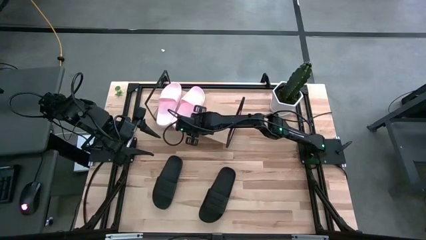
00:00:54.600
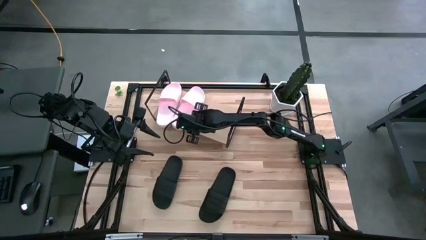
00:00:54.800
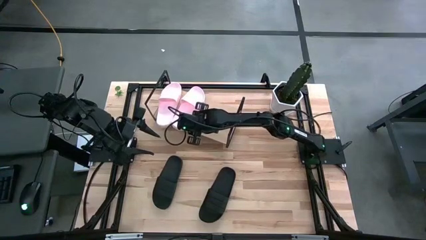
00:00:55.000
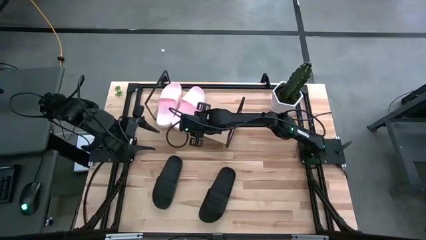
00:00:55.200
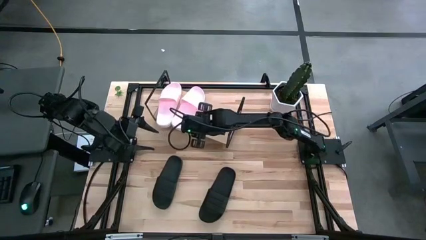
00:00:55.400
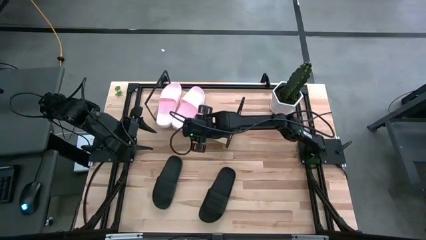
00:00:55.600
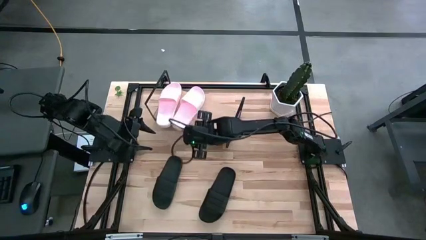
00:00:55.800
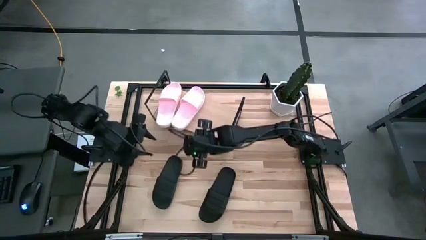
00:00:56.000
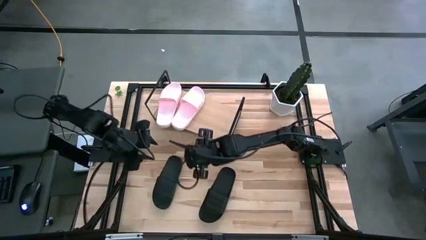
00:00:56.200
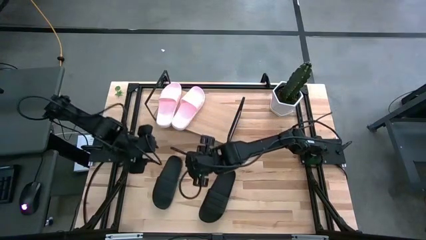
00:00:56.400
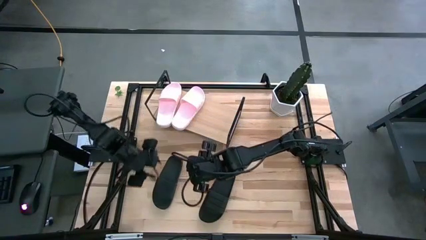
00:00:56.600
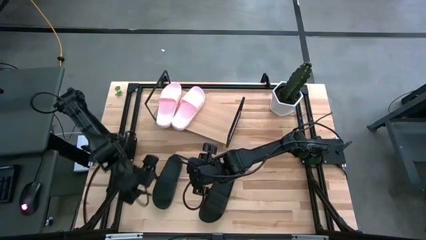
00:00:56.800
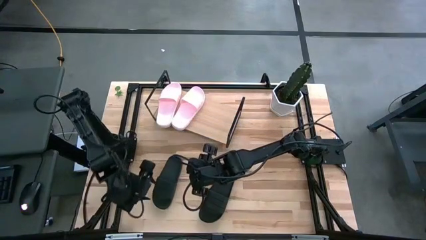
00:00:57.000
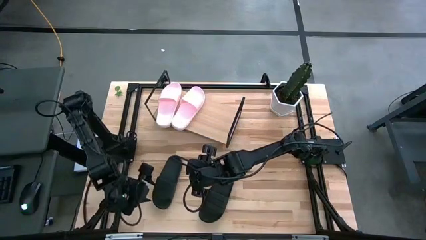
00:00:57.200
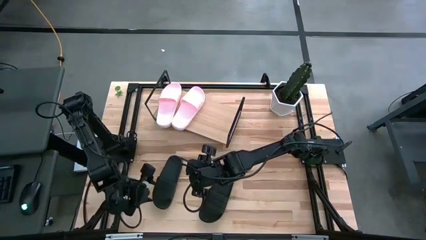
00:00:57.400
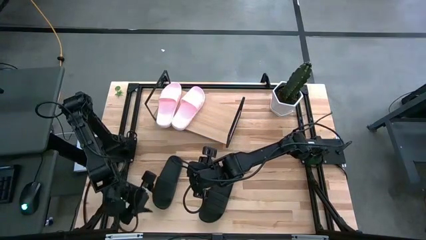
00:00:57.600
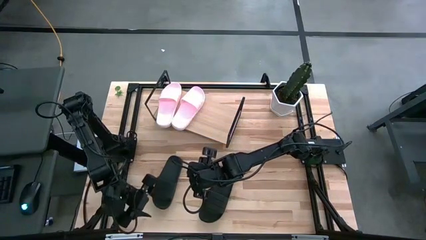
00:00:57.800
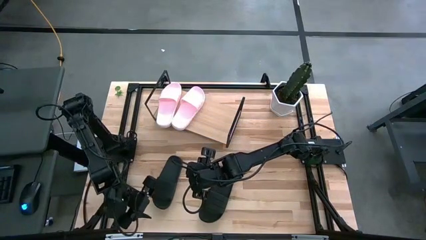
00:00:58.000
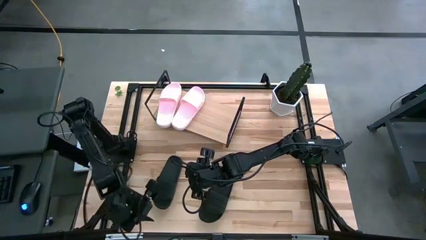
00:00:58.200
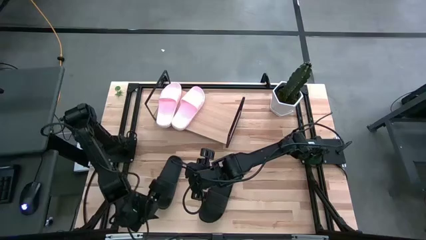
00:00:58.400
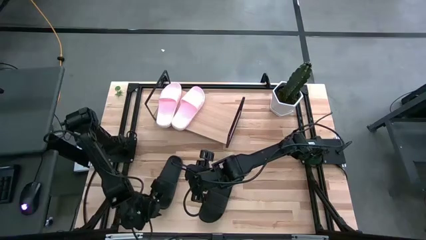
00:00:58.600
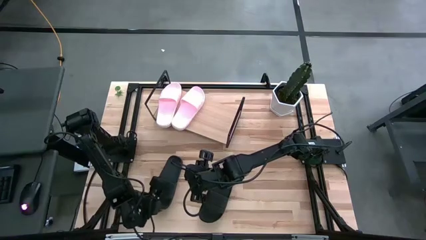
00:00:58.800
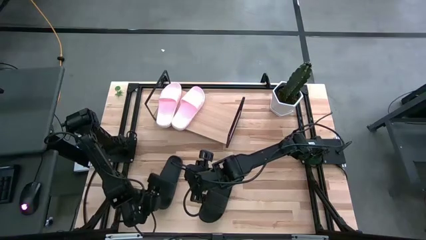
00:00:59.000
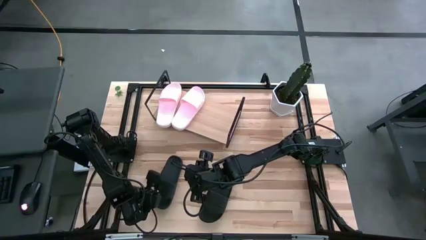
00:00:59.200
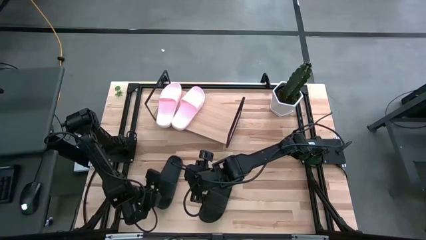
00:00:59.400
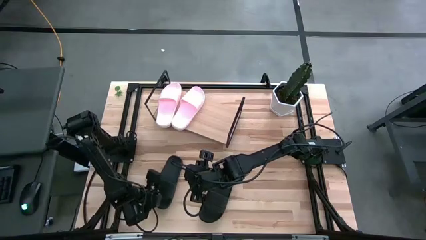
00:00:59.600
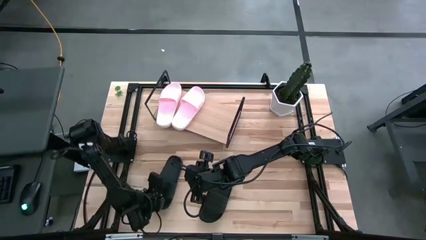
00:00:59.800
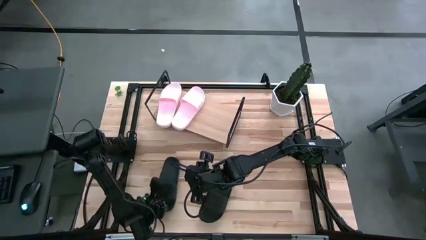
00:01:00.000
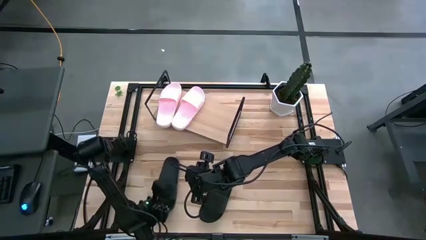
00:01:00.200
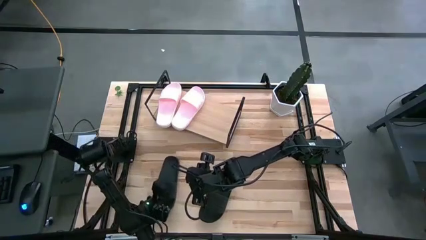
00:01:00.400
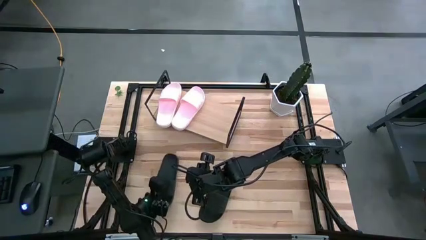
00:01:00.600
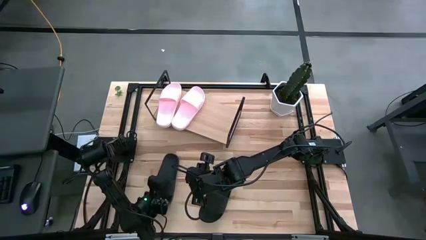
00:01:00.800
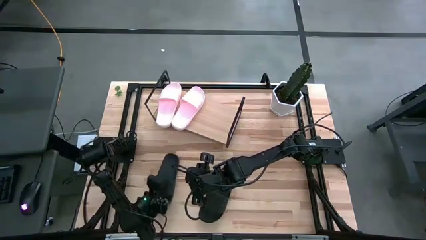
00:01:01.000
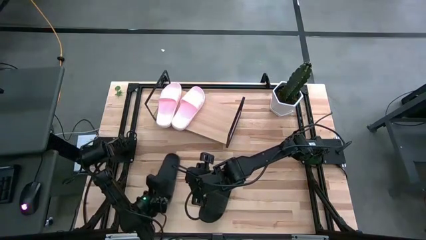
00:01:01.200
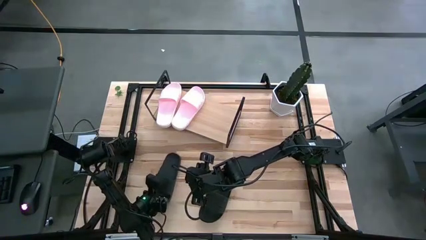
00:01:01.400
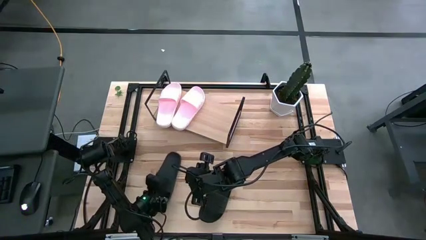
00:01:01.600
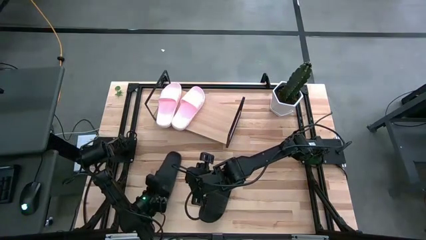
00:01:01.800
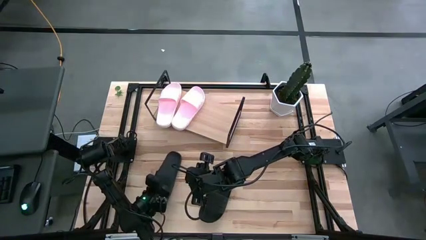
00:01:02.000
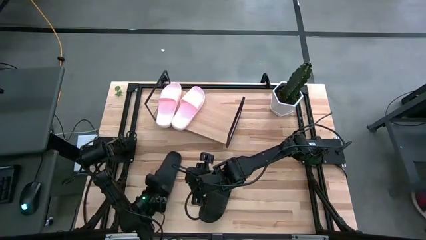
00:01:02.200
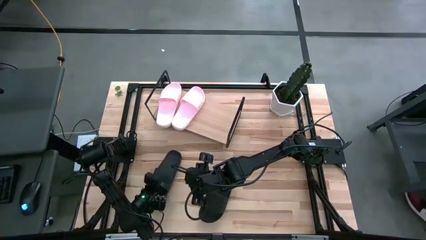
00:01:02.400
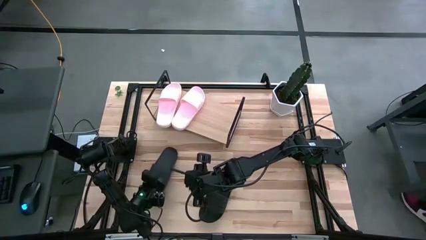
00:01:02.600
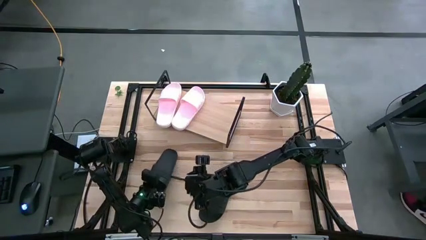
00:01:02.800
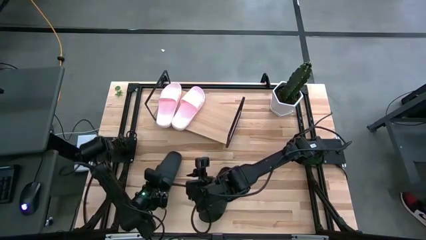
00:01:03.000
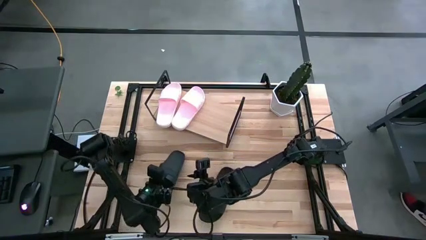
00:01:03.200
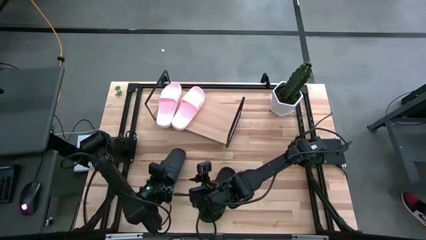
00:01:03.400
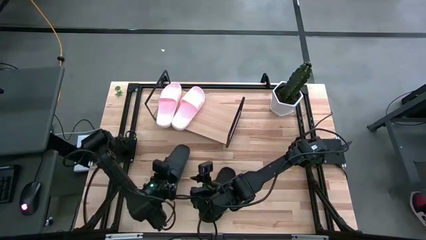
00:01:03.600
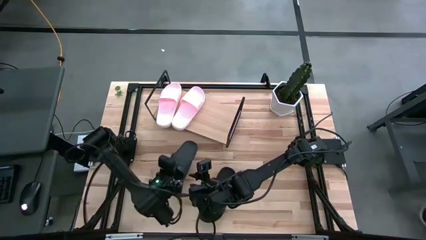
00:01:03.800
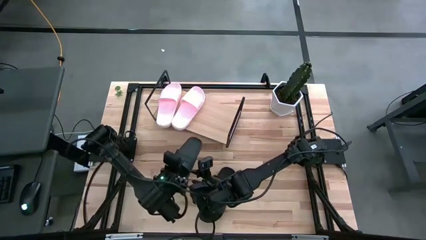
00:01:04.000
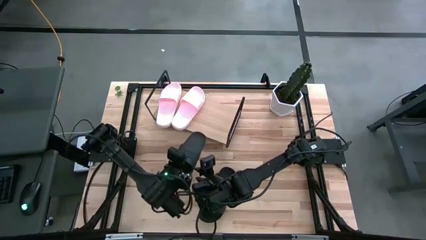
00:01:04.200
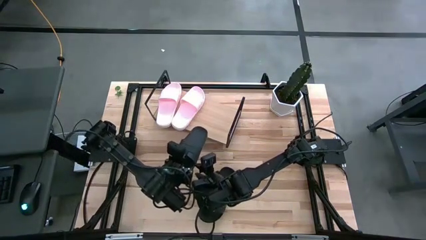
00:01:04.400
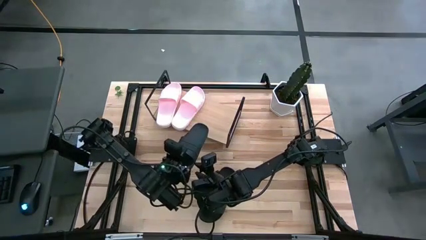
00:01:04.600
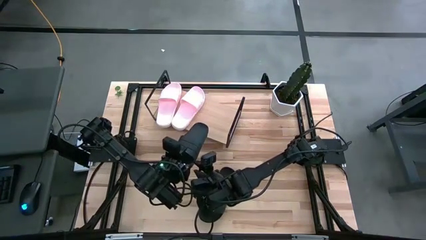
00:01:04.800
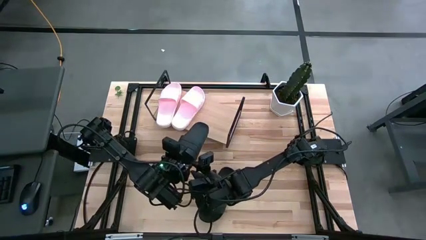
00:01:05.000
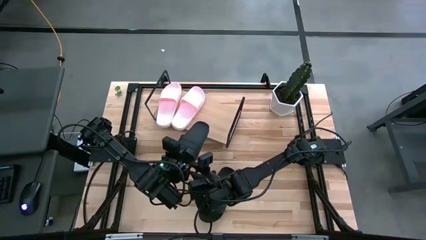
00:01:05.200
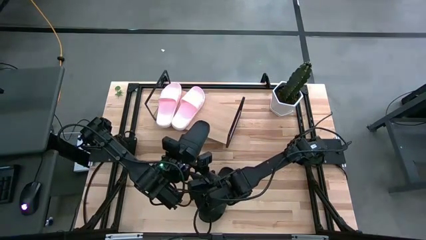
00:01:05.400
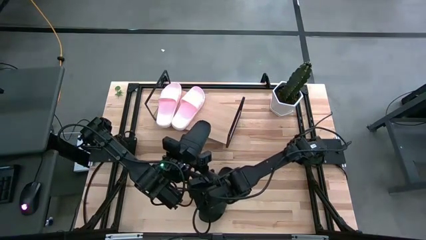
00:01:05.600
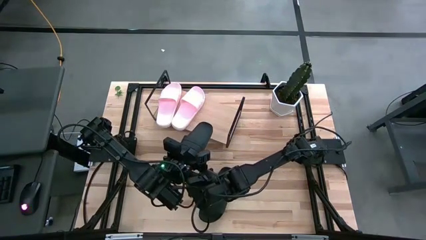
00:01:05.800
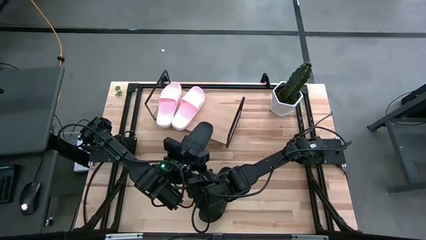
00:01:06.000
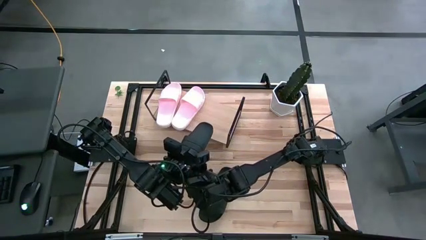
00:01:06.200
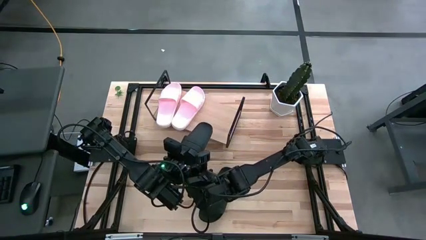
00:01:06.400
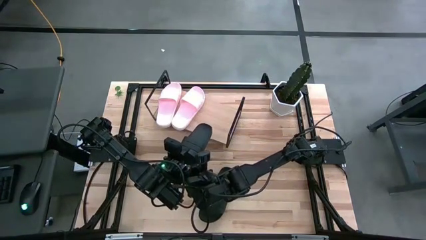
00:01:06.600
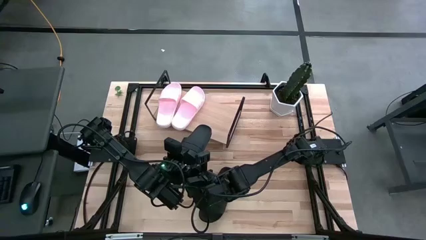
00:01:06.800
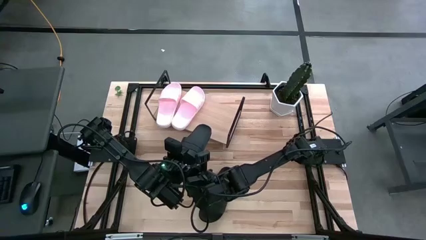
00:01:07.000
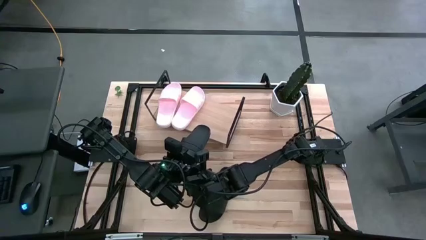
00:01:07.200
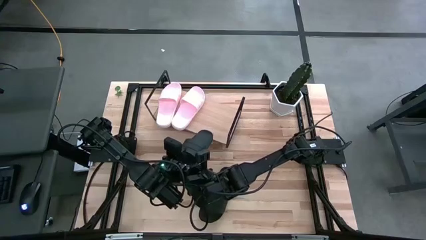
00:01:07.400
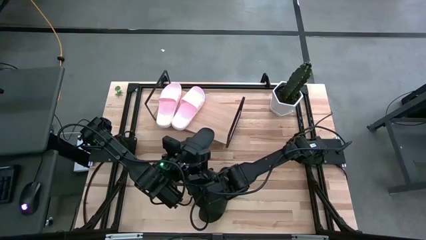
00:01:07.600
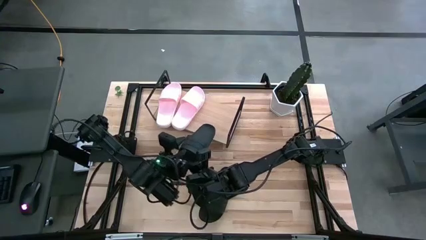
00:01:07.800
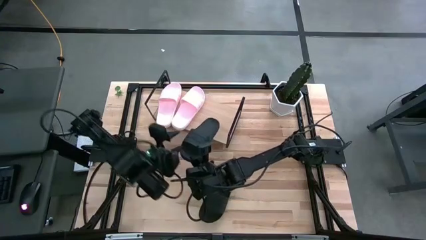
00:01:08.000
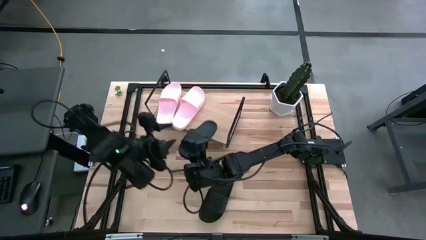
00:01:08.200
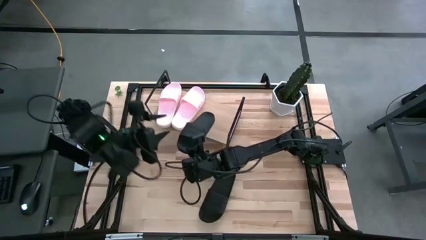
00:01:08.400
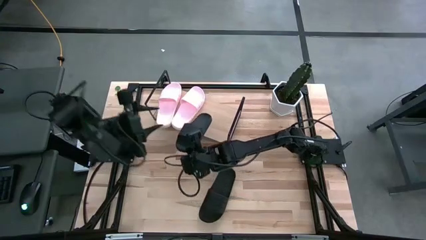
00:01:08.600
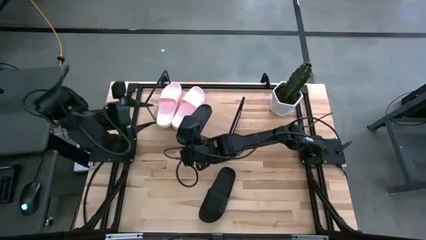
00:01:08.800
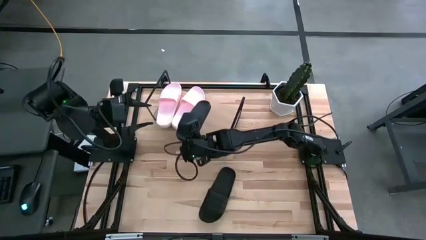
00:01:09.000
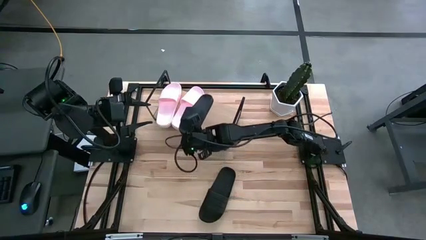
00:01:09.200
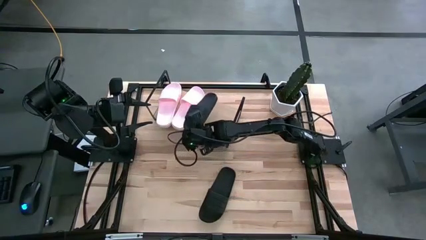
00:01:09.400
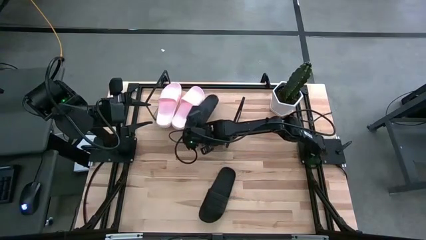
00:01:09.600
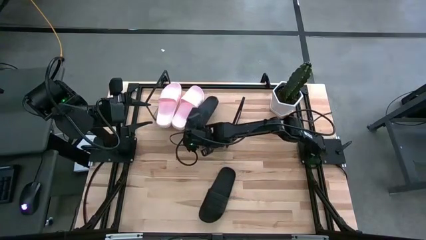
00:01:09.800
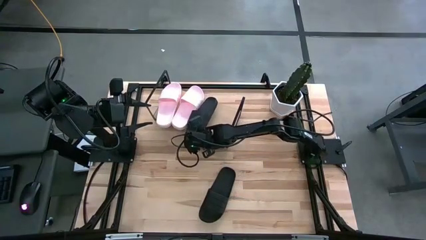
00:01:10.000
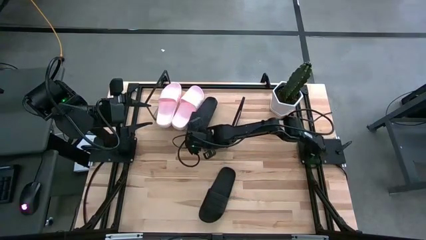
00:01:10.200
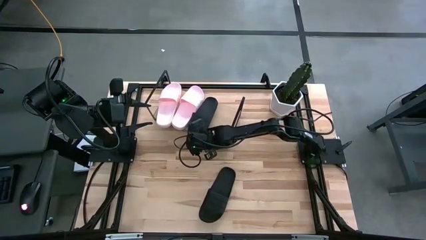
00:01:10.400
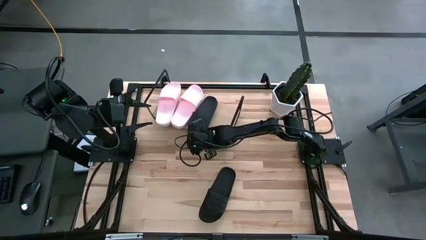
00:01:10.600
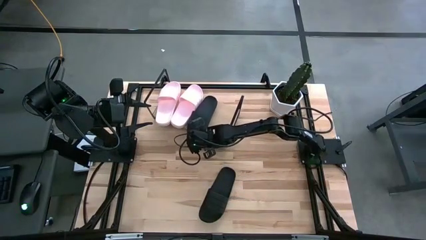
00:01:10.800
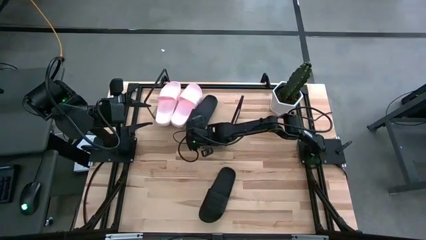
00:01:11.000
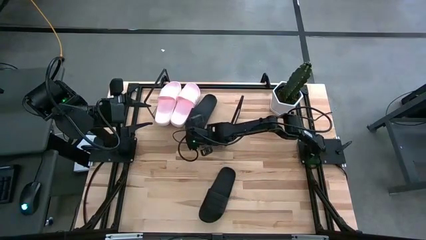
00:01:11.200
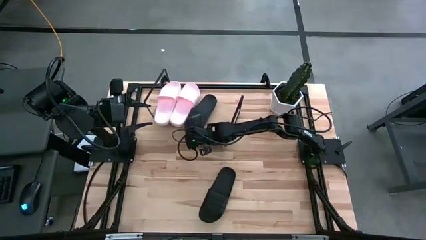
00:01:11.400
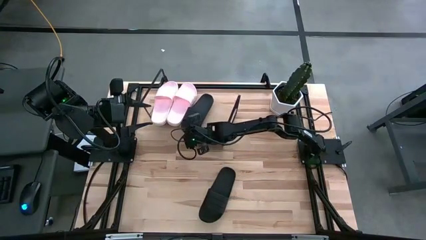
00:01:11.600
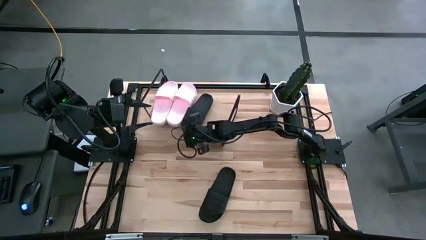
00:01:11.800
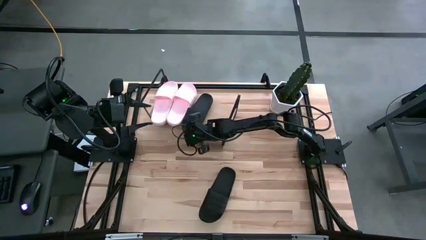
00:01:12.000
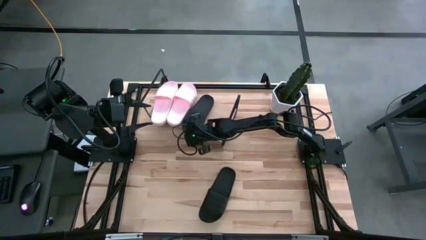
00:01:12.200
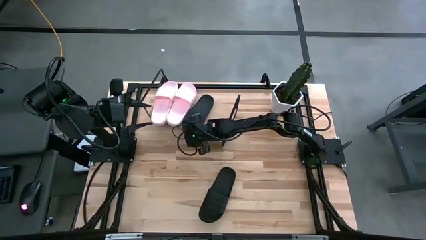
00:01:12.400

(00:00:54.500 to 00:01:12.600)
Task: Pick and place slides into the shelf
Put the left black slide on the shelf
